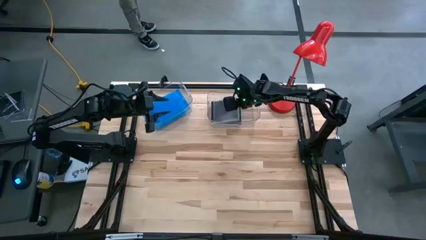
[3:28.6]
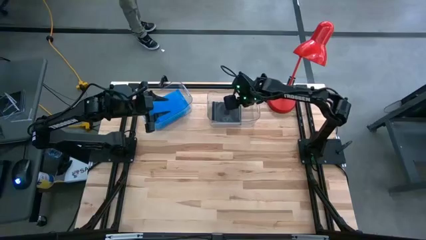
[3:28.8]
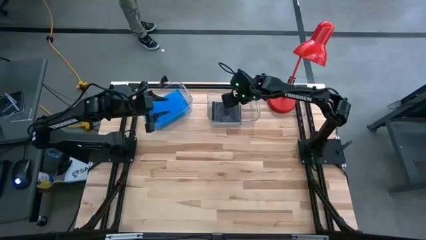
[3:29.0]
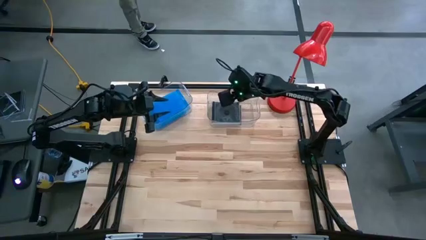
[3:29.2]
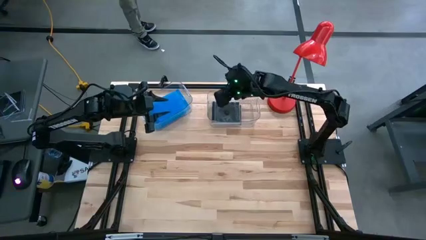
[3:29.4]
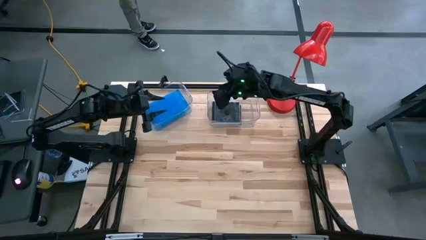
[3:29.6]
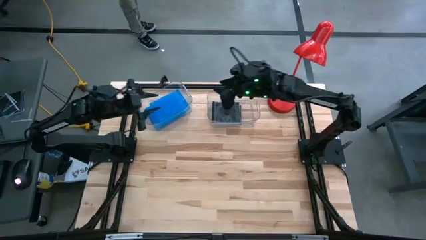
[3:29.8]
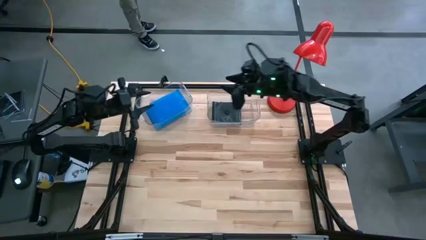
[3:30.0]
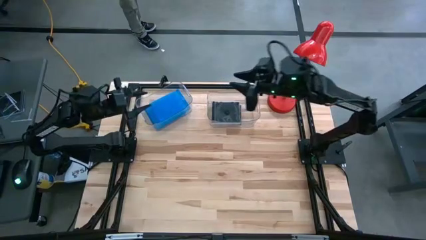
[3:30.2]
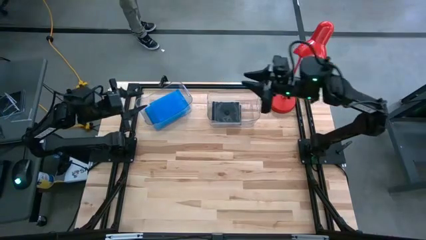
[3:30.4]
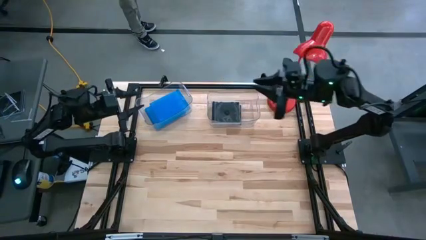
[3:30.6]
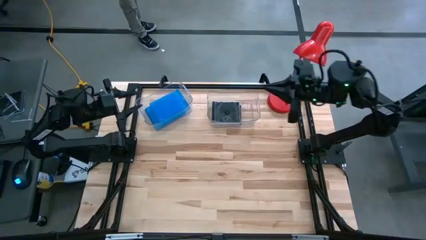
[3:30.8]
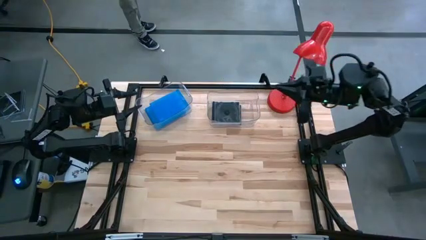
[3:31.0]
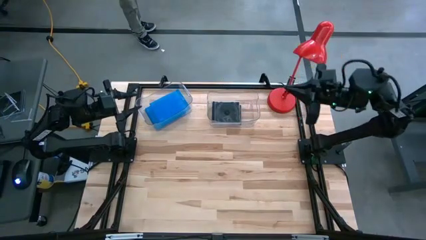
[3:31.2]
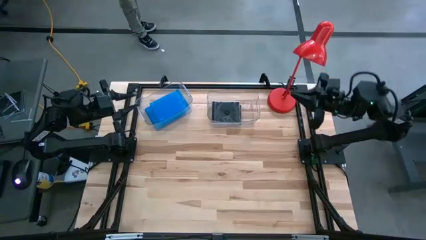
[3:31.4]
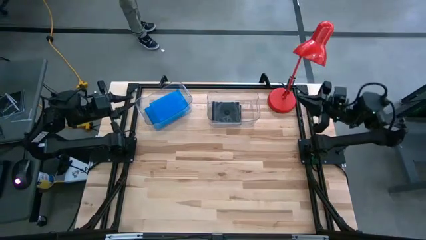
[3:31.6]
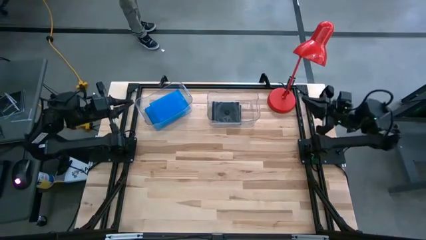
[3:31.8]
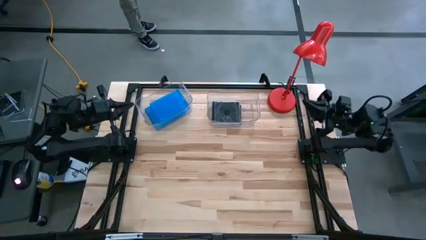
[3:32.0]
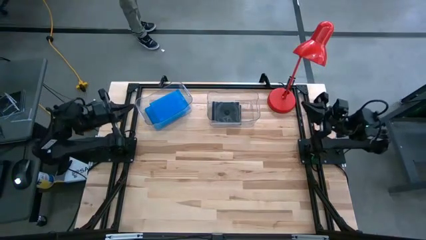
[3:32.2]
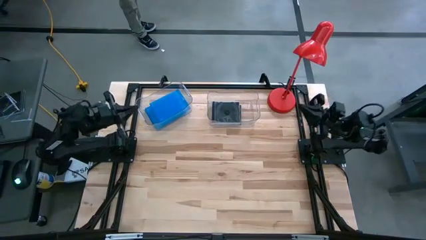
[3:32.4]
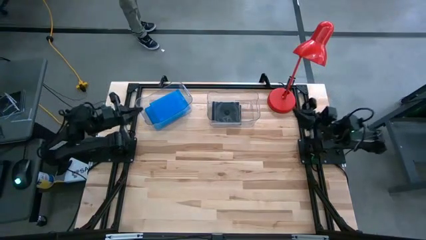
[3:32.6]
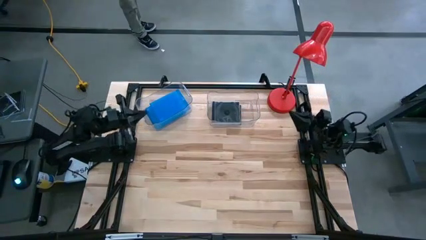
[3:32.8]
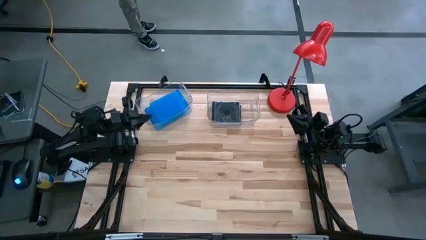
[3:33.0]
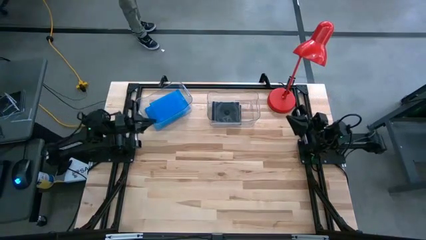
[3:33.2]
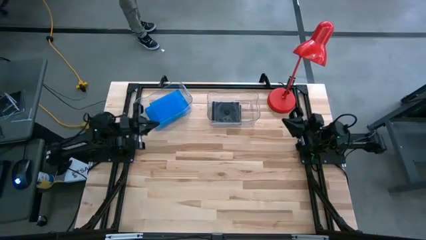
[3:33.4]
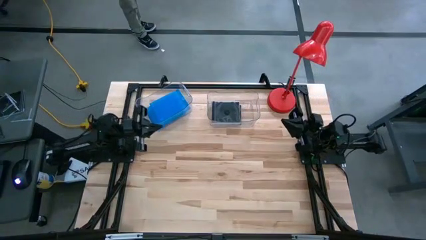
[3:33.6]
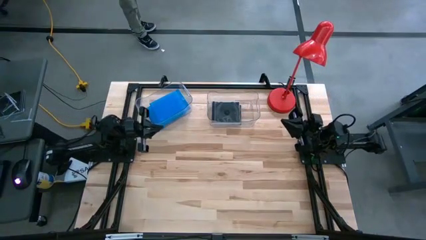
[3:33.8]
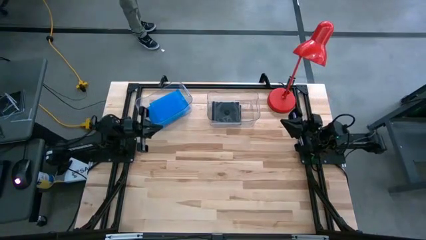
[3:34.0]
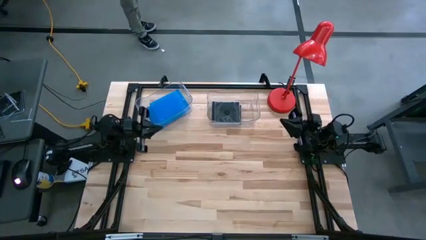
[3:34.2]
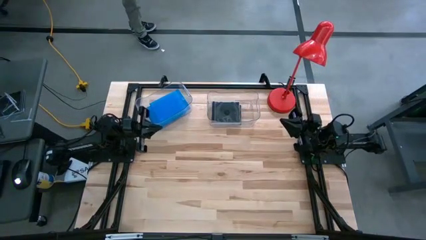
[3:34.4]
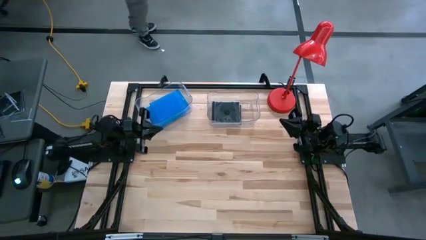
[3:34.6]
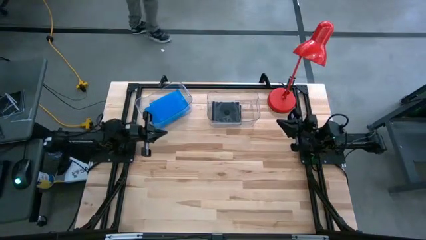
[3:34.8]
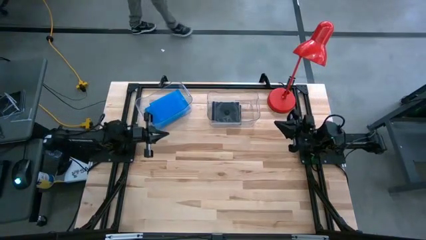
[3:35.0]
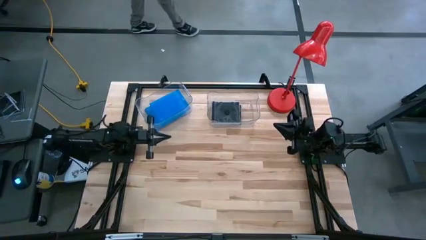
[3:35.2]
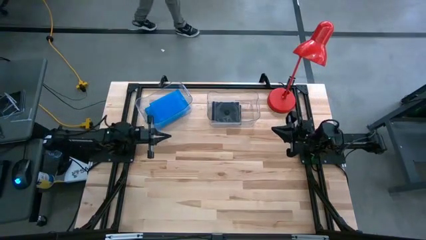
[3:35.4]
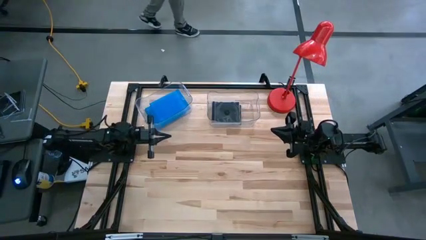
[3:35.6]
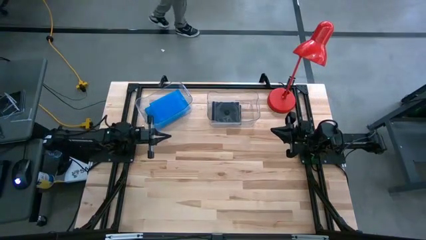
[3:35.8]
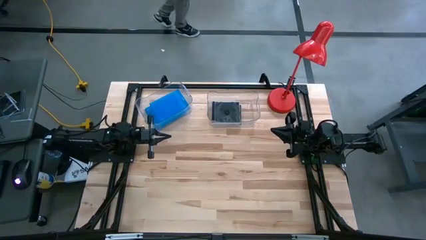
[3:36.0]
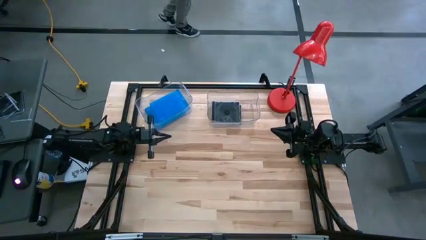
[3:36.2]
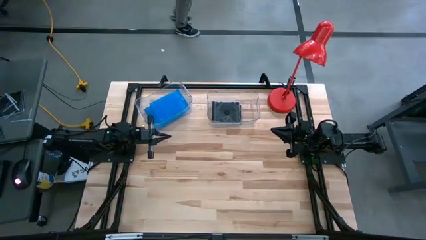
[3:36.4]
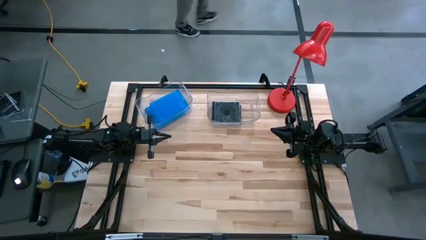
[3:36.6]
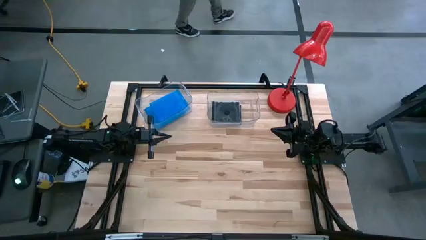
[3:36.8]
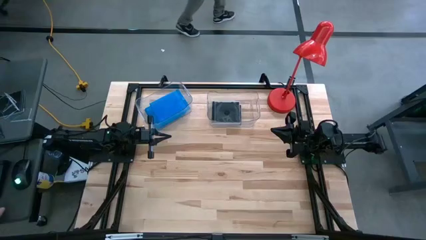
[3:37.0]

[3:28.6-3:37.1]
Task: Pick & place jewel cases by type
Return To Home Position

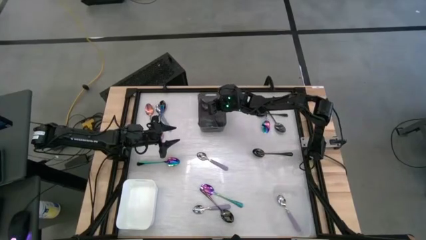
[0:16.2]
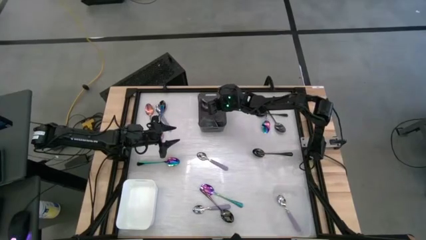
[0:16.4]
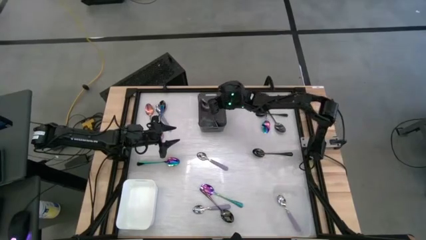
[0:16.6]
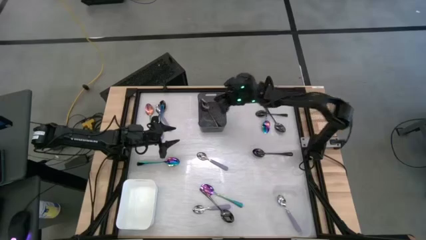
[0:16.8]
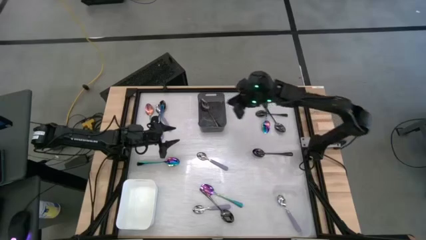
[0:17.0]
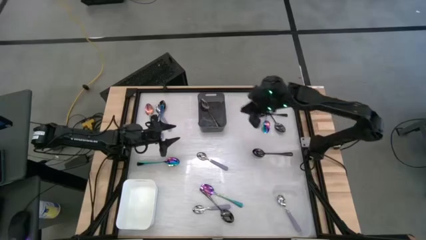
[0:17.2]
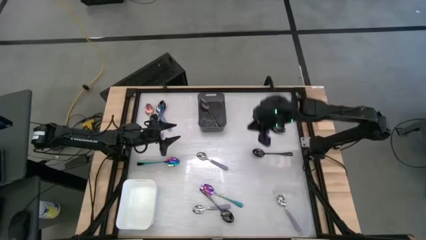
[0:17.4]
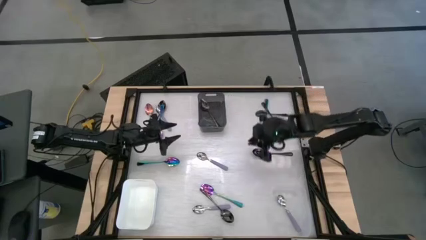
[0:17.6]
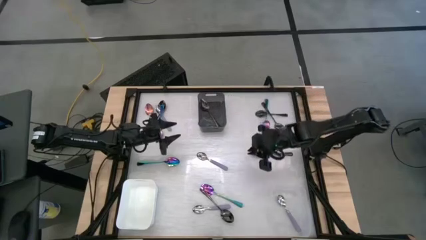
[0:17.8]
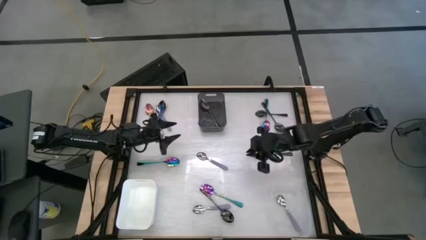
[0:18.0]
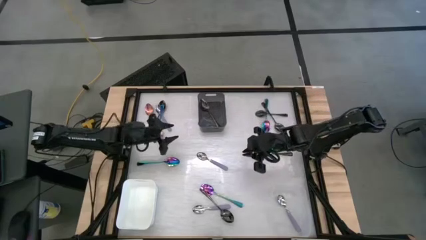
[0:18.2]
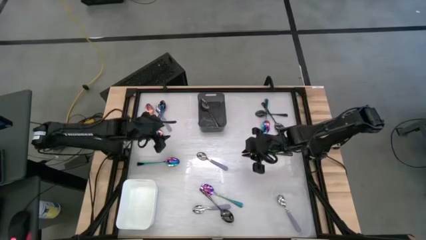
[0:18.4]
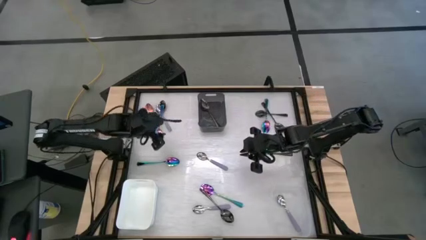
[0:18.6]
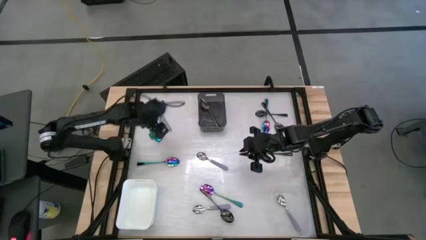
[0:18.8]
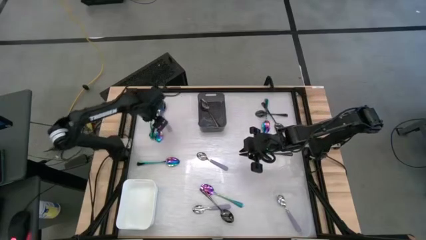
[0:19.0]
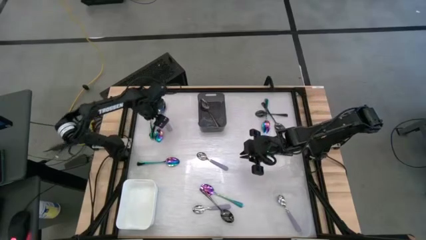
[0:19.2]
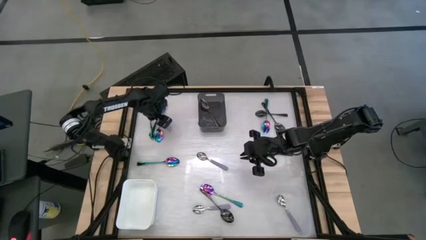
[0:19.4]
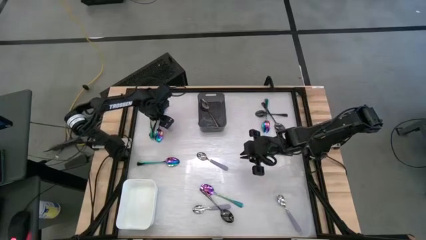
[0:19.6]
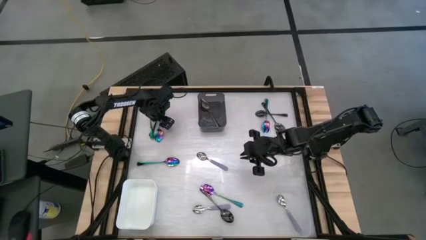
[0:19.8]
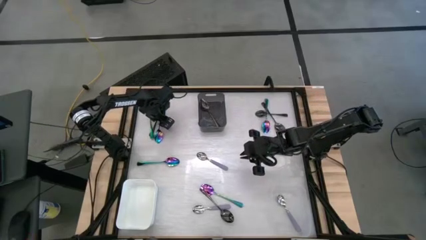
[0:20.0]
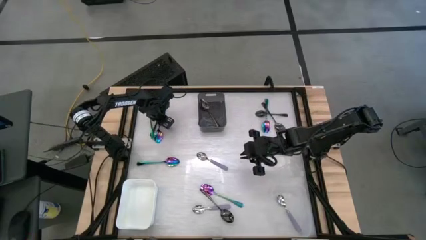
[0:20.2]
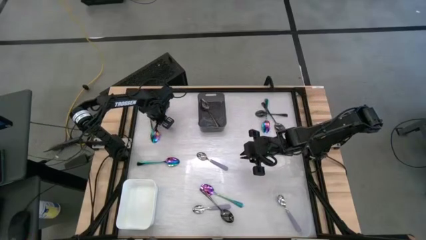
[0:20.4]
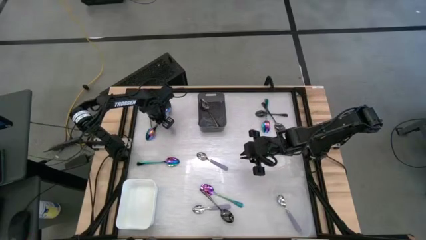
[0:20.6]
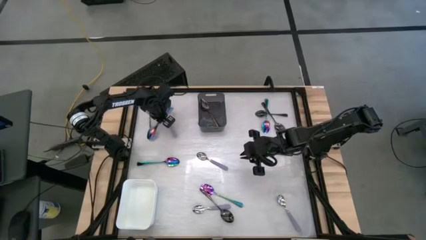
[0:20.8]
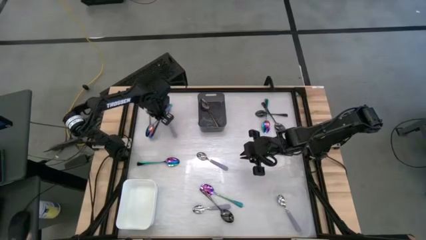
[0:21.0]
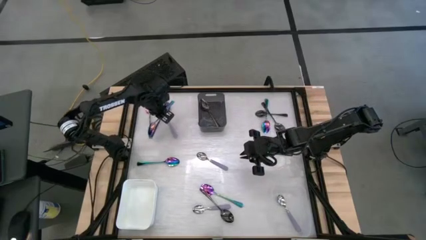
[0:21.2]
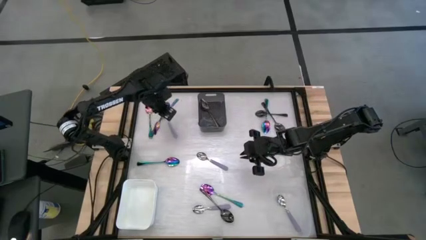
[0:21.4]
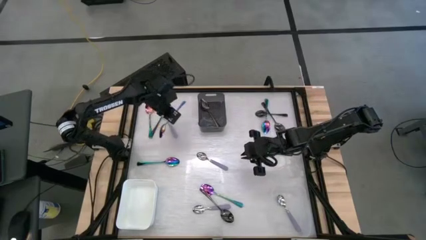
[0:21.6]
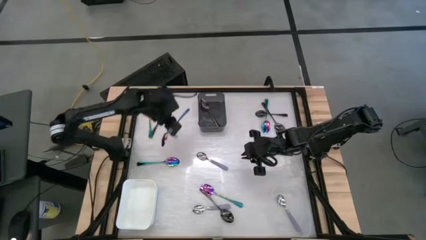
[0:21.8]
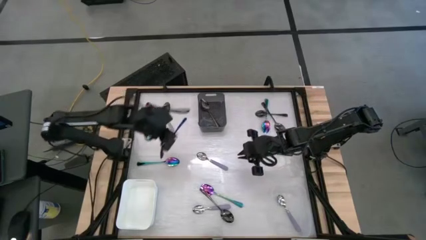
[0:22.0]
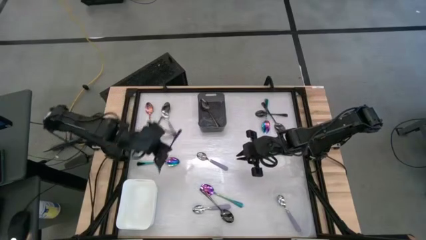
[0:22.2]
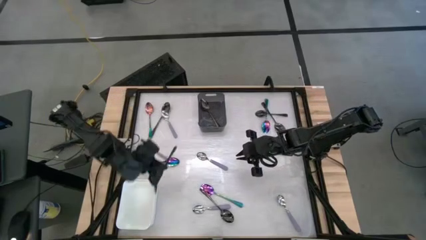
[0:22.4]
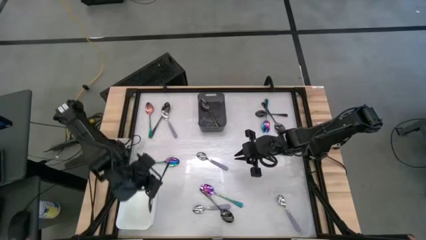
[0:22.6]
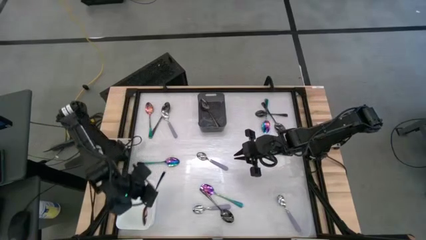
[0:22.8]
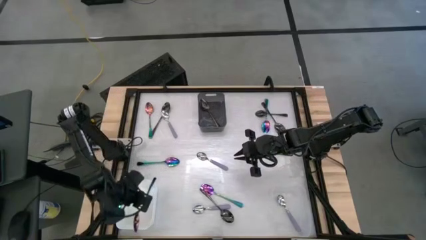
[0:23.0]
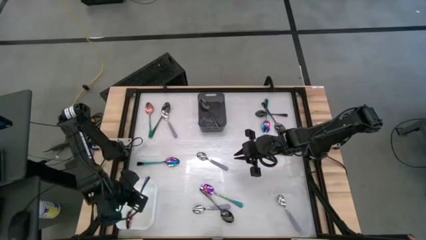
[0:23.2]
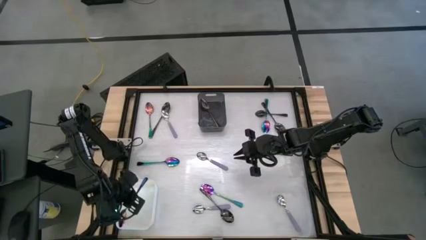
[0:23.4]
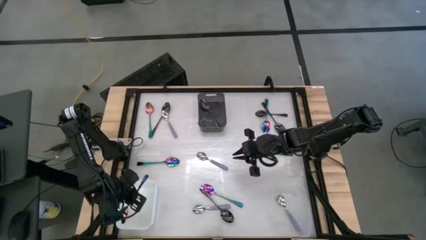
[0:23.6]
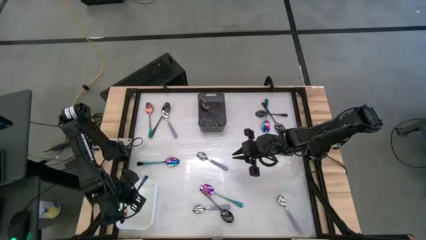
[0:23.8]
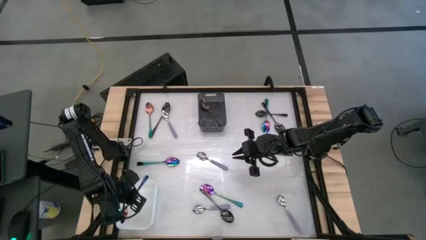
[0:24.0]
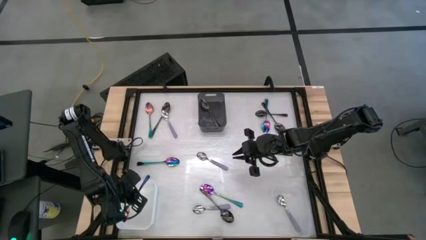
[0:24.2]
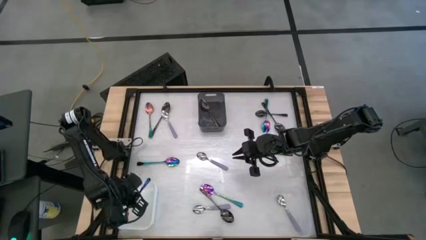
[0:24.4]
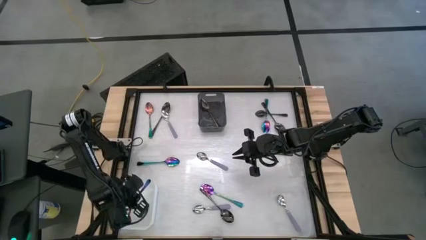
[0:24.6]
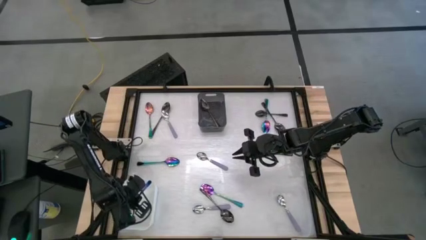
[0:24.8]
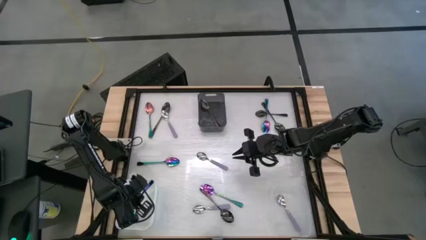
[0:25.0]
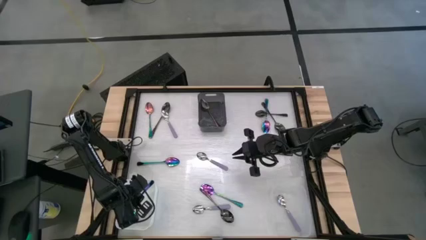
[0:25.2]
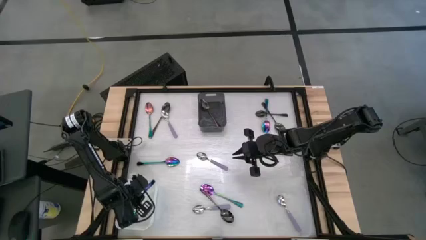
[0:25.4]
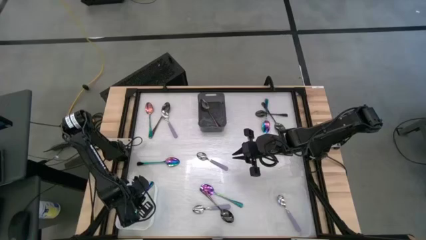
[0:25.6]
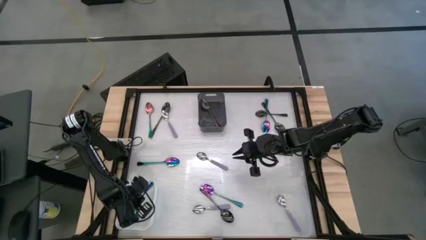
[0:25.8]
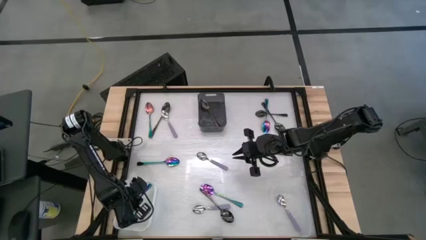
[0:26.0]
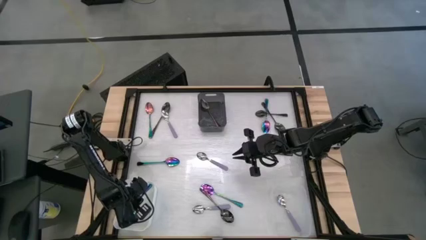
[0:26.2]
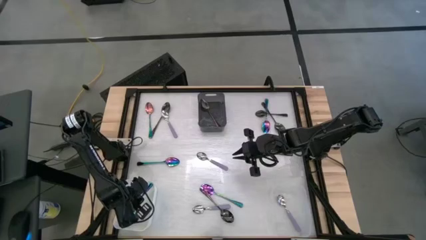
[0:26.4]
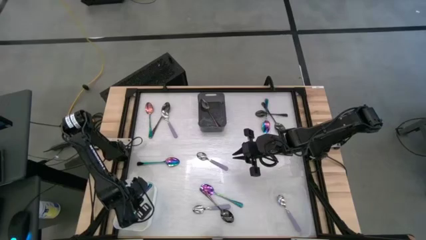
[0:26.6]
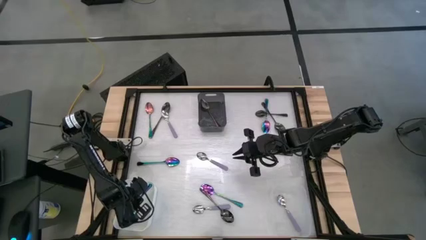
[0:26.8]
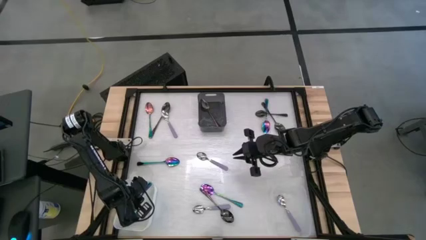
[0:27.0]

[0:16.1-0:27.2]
Task: Sort silverware by color (type)
Put the blue spoon into the white bin
